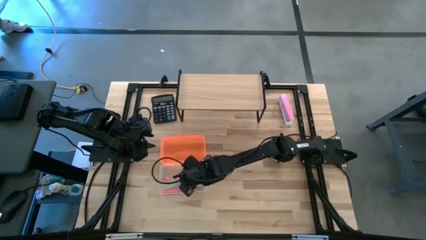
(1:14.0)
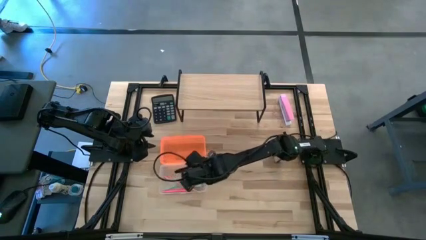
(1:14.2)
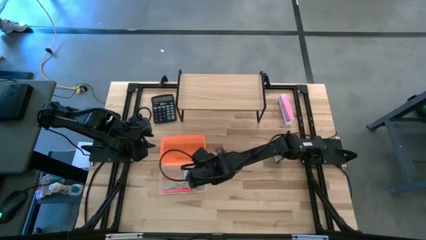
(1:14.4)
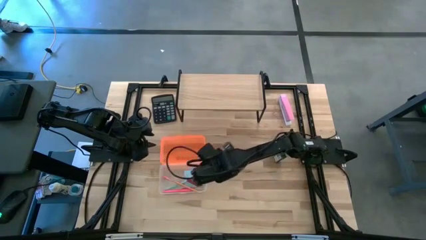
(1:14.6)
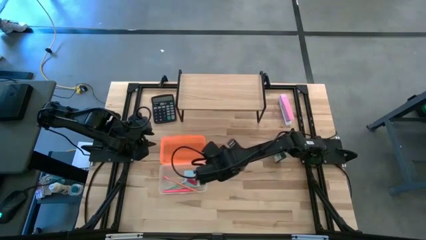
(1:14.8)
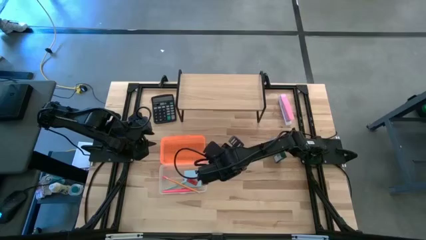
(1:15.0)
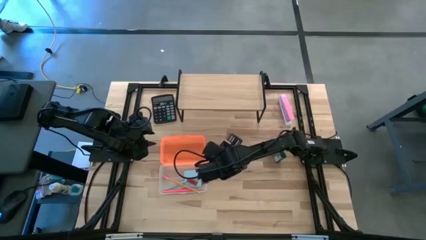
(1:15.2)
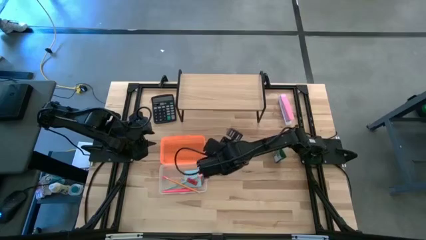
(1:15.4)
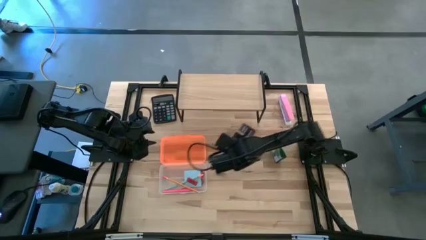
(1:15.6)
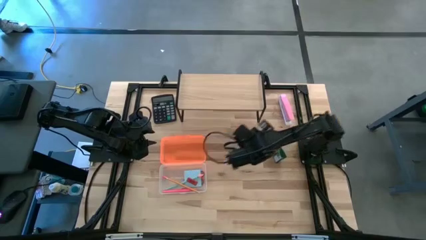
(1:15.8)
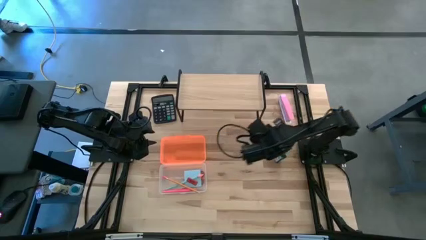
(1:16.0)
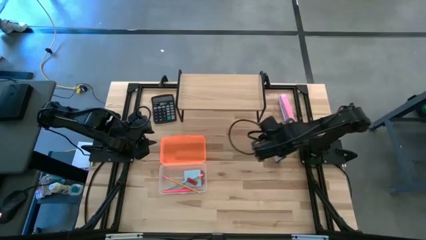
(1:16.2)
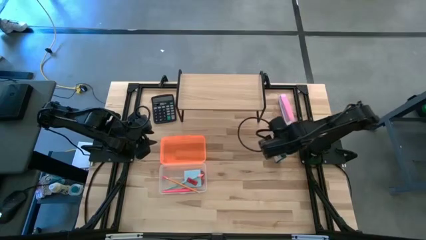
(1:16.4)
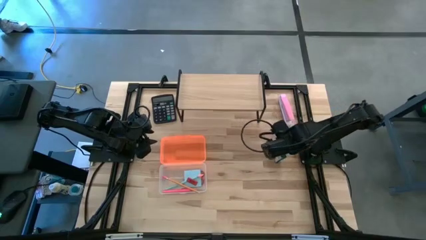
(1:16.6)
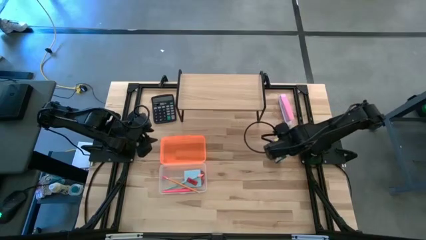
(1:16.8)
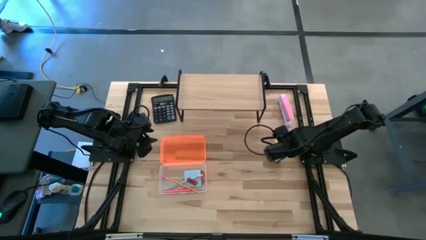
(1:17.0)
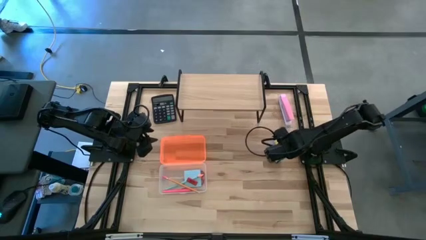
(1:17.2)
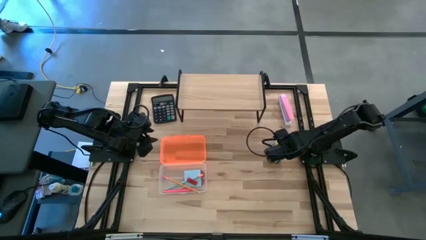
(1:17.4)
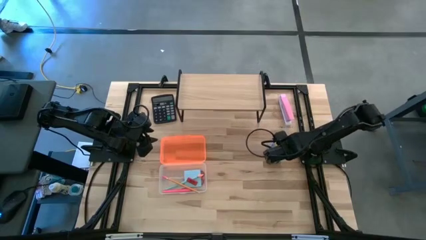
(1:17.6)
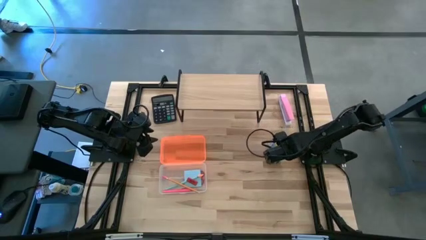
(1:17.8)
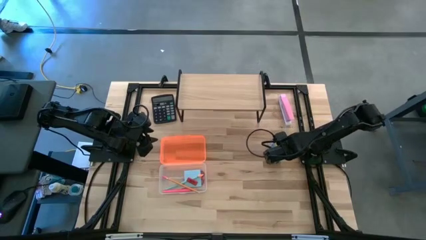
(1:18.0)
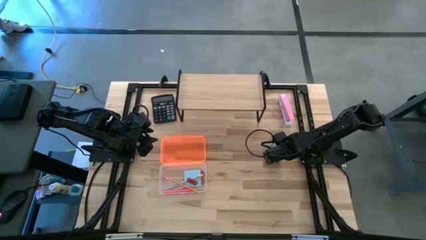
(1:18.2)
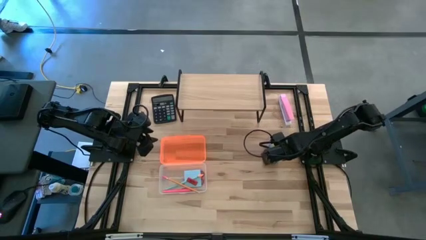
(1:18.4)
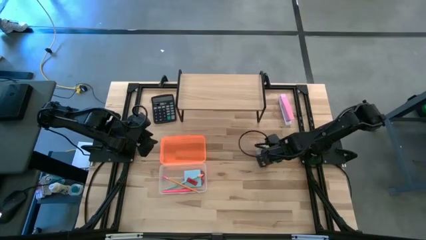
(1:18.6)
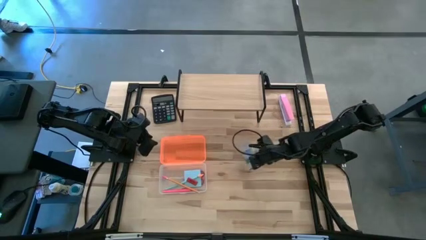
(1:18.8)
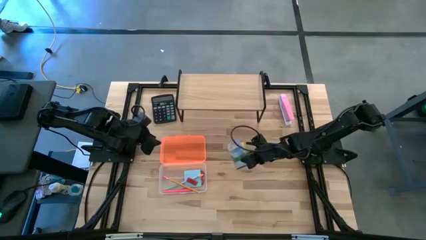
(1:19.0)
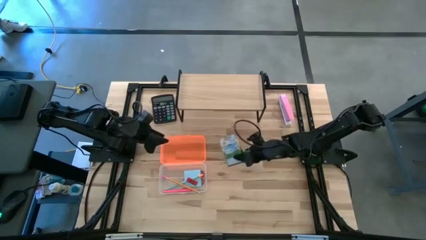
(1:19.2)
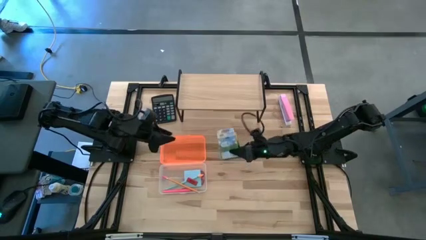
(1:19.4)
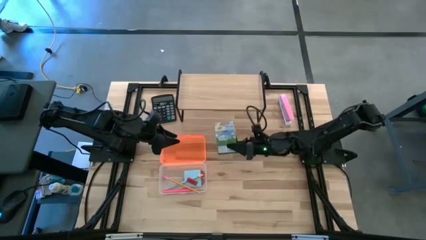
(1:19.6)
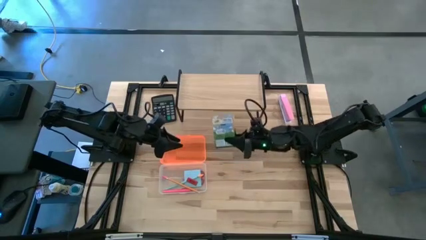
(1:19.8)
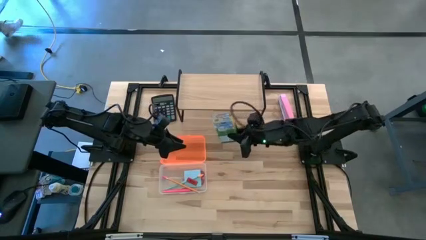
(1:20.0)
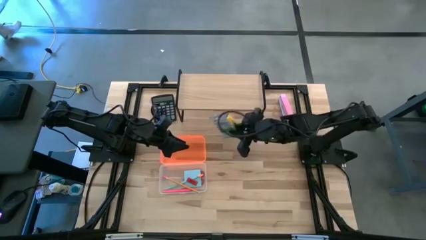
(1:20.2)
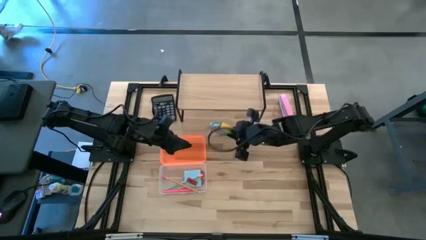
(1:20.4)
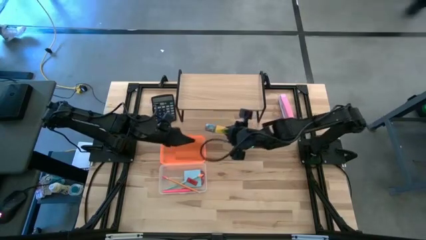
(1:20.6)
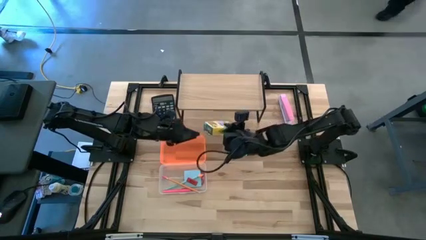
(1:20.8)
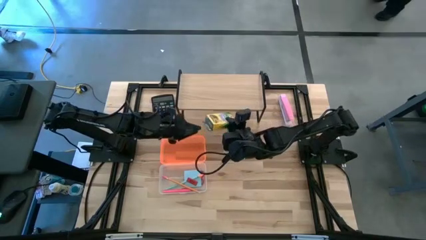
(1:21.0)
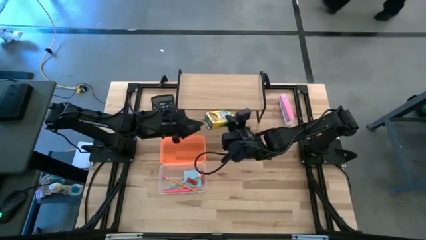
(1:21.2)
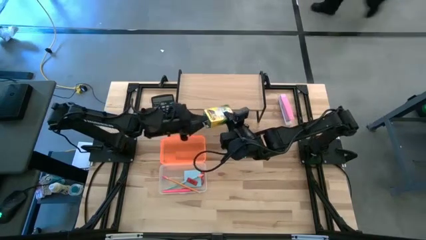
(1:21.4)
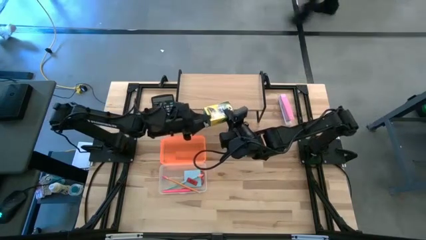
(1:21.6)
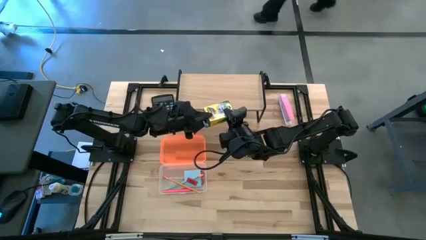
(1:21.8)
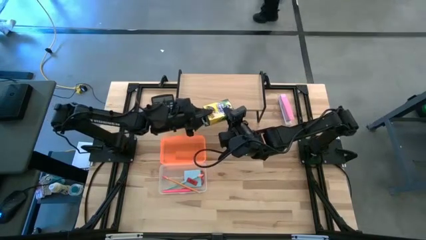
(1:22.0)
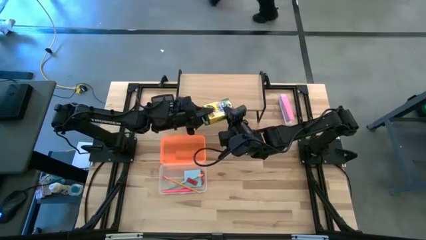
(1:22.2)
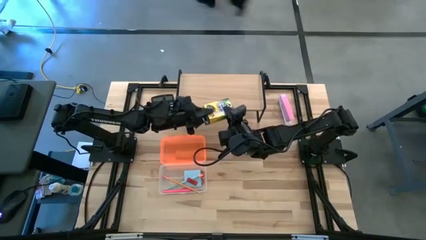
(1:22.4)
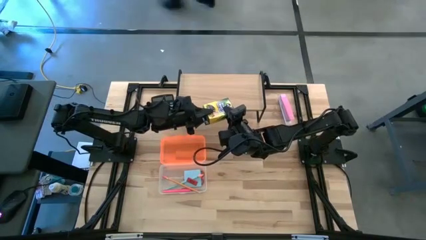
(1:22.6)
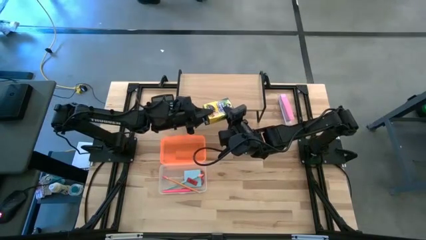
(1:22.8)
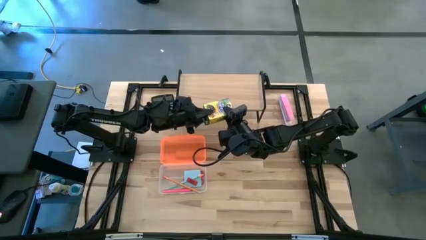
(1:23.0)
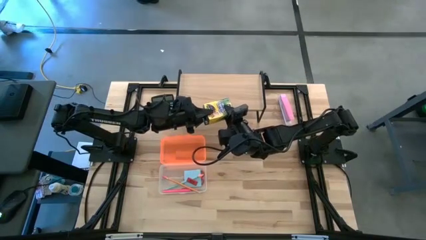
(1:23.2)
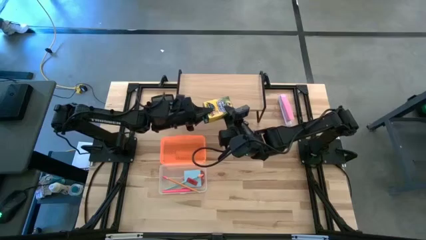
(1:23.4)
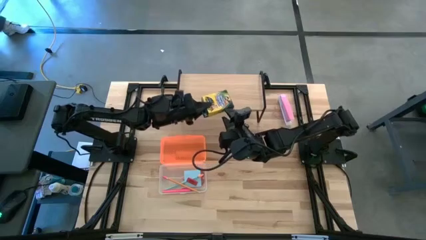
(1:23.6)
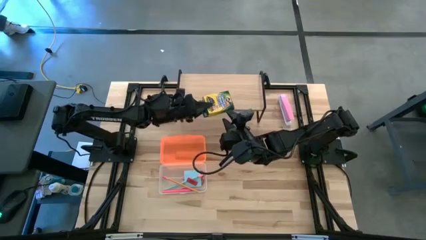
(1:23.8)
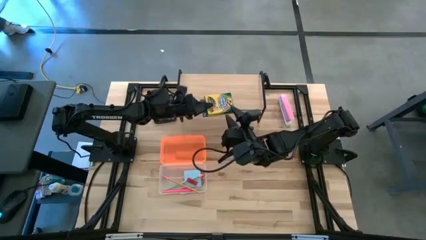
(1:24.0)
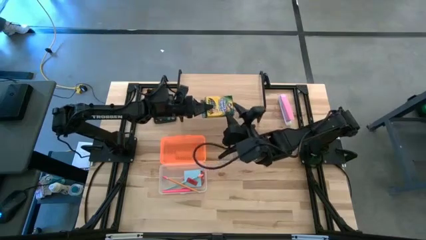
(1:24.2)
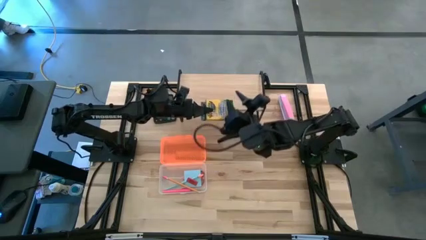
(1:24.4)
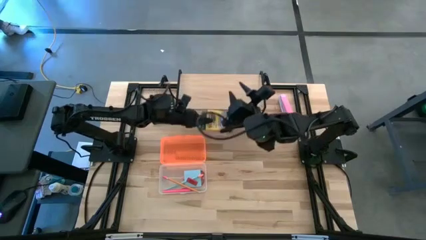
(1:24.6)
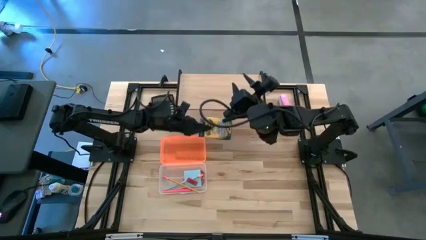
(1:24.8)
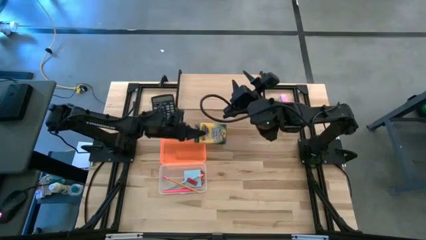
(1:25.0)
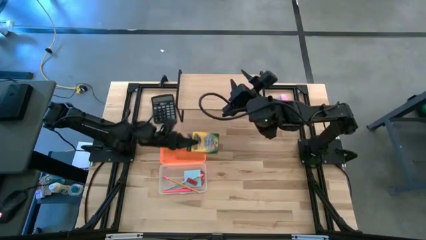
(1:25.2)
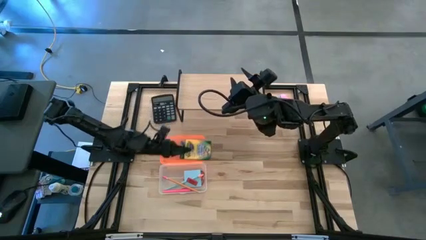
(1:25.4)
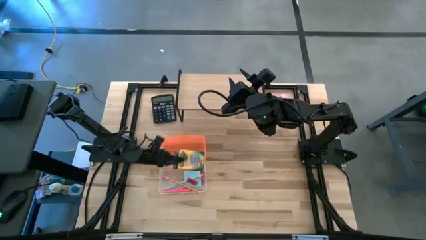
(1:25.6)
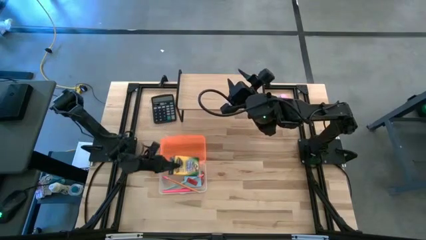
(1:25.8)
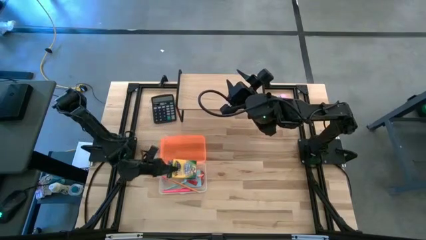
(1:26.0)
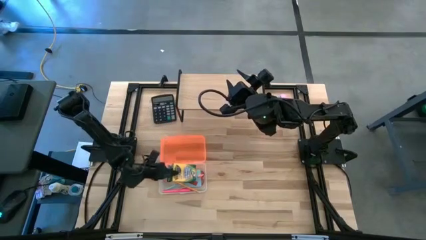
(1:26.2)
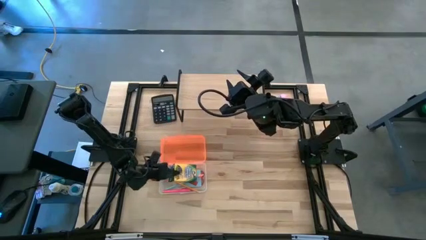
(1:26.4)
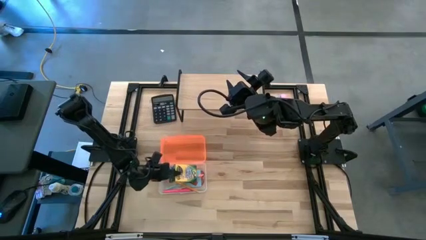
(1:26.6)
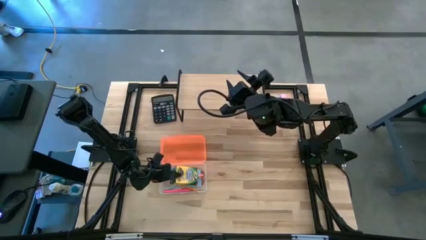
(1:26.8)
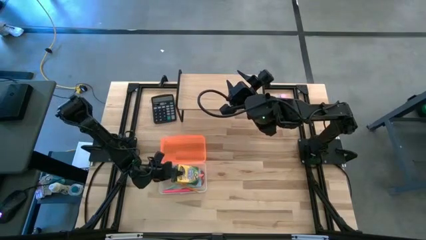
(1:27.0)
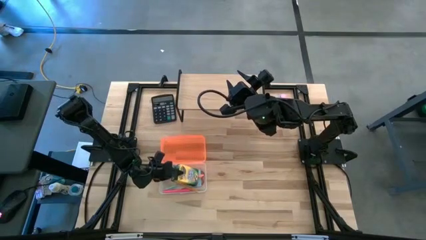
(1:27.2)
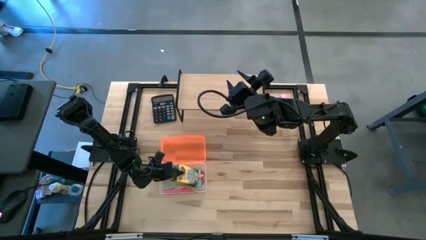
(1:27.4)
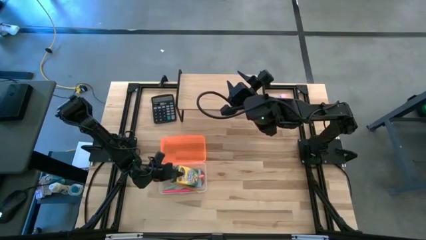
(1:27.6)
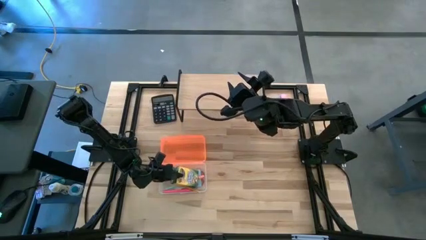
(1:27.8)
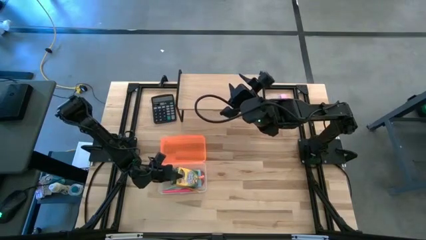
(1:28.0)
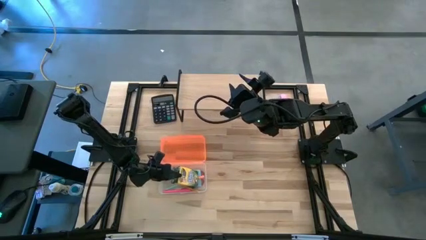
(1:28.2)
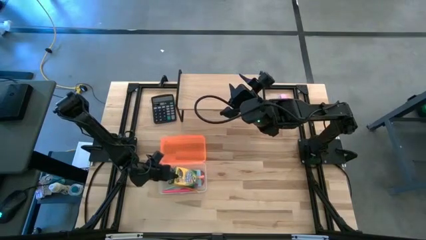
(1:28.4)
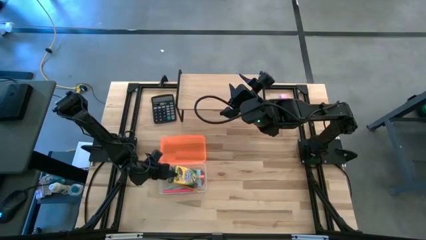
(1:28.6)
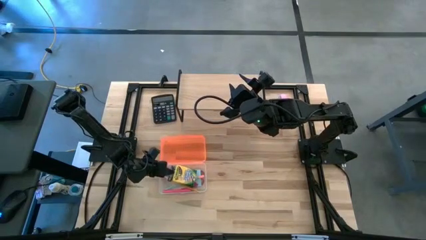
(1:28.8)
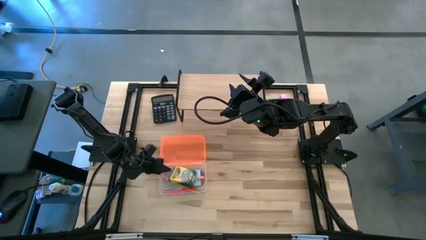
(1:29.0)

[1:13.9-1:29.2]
Task: Pack school essentials
Put the box of crayons into the supply box
